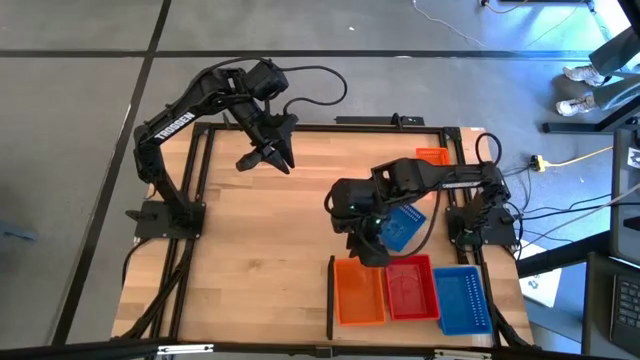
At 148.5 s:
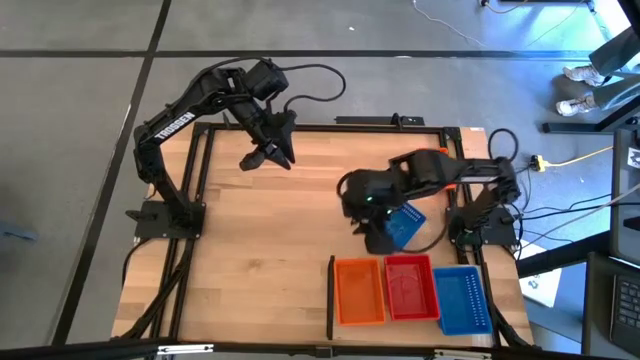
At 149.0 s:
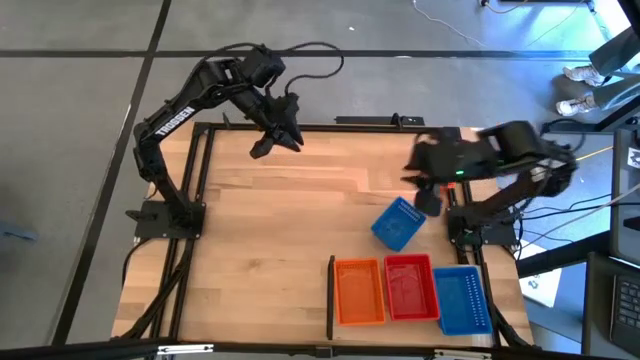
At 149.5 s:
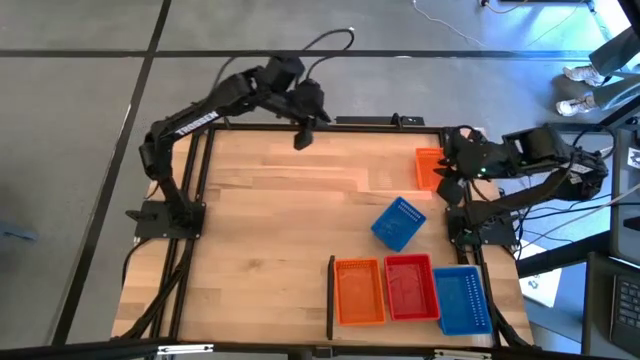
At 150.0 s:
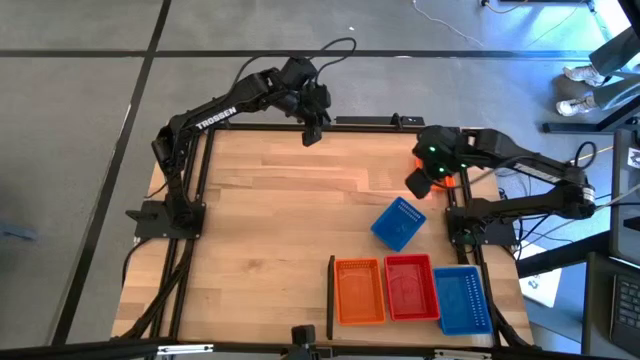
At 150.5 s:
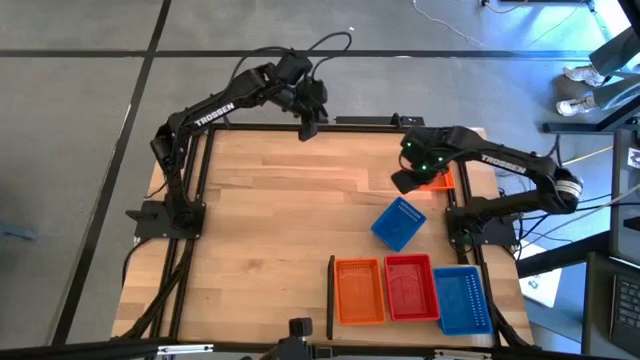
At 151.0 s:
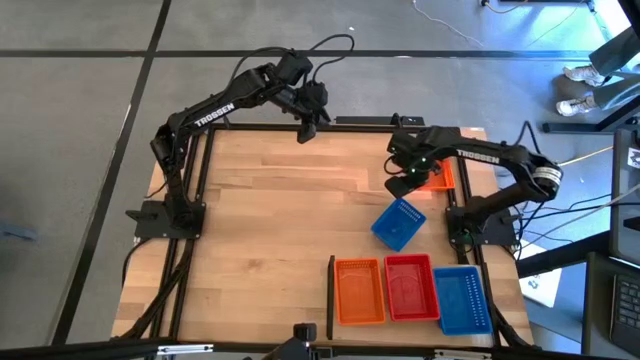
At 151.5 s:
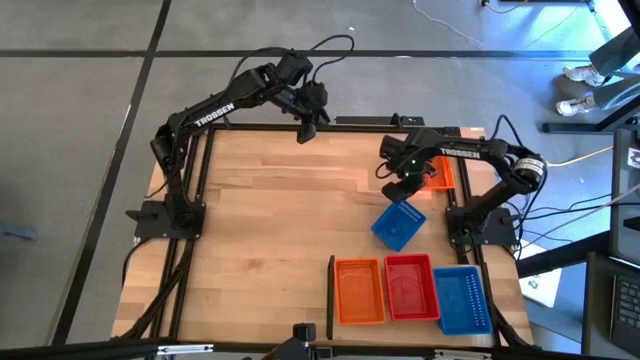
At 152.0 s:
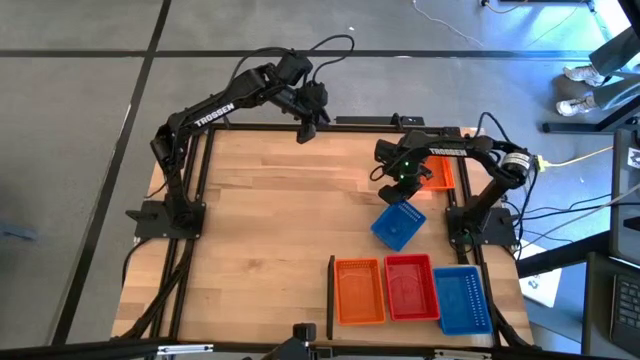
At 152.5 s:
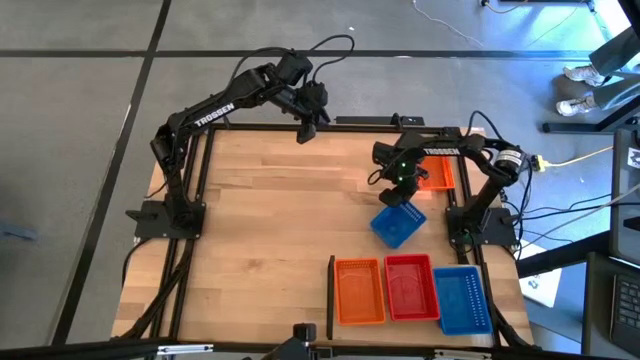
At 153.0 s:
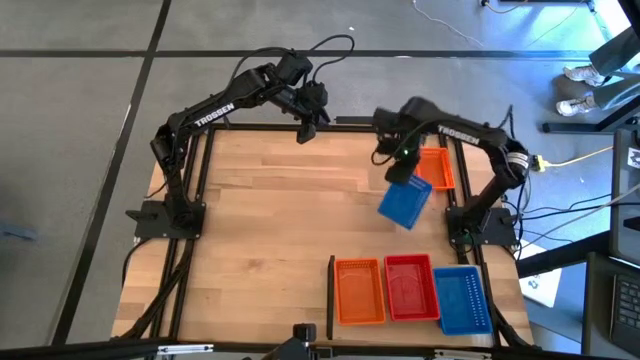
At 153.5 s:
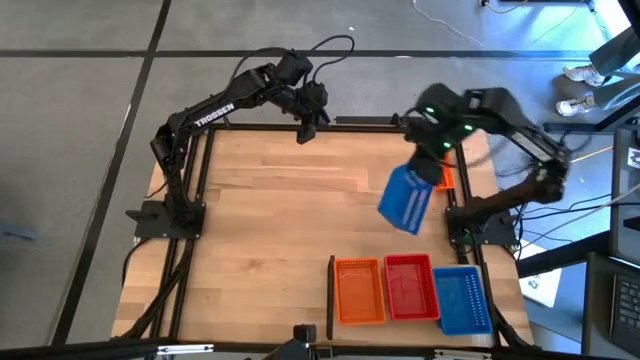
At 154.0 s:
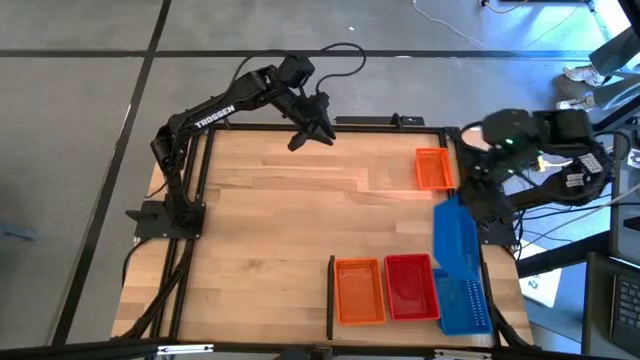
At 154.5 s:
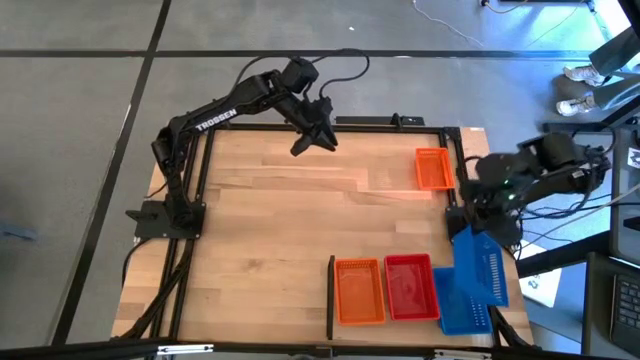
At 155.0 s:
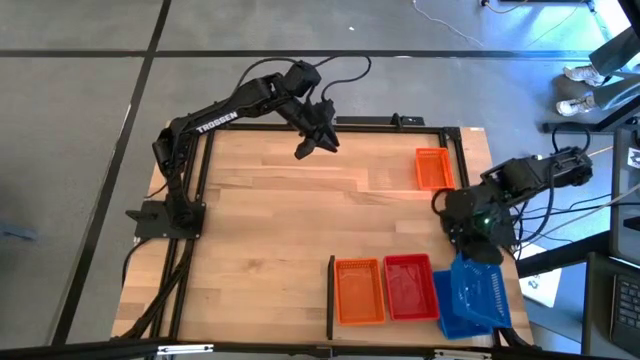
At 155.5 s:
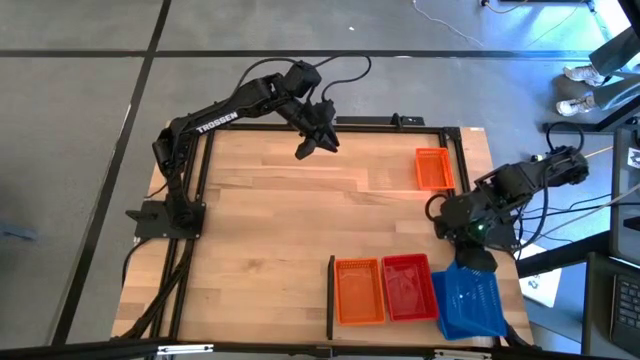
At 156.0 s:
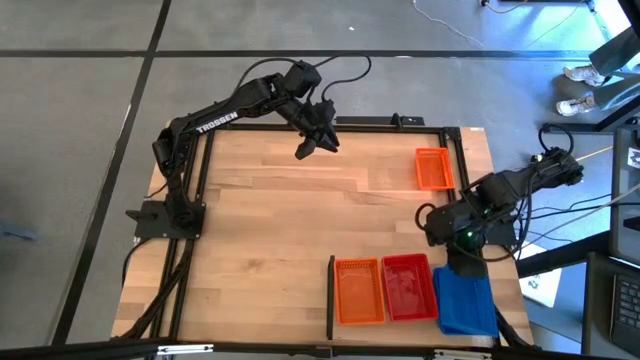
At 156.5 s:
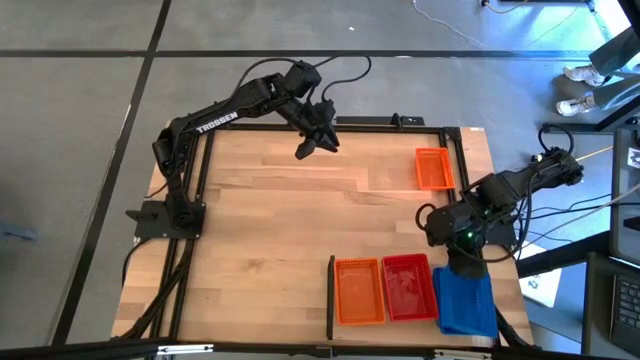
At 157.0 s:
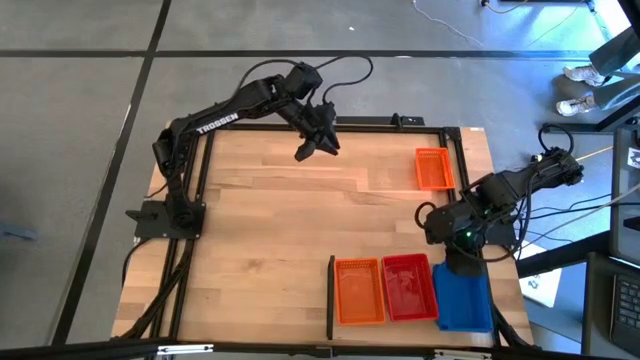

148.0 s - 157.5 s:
Task: Stack baskets on shelf by color
Stack the blue basket on top of the blue baskets on the shelf

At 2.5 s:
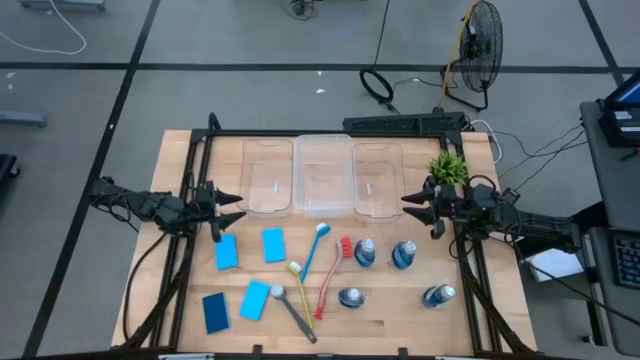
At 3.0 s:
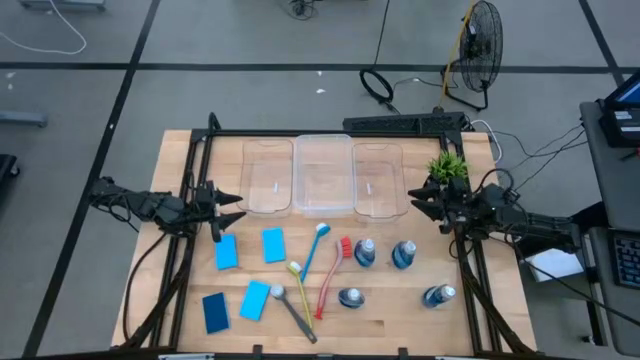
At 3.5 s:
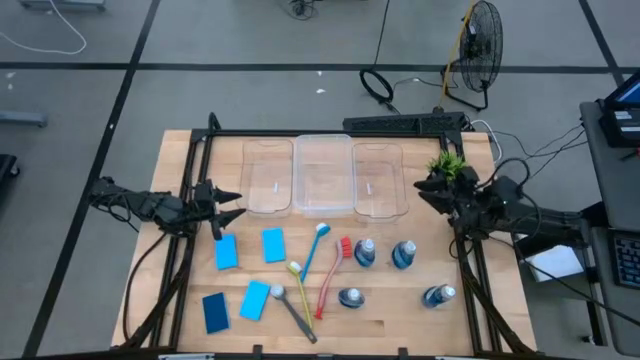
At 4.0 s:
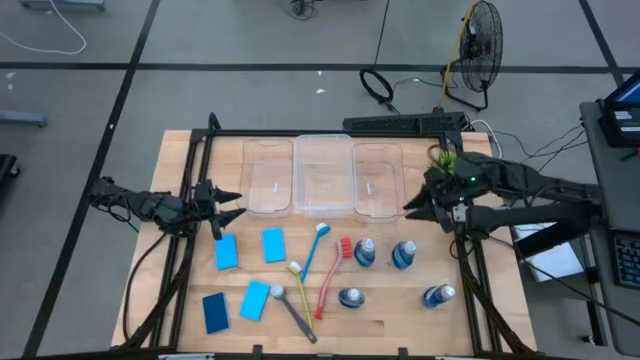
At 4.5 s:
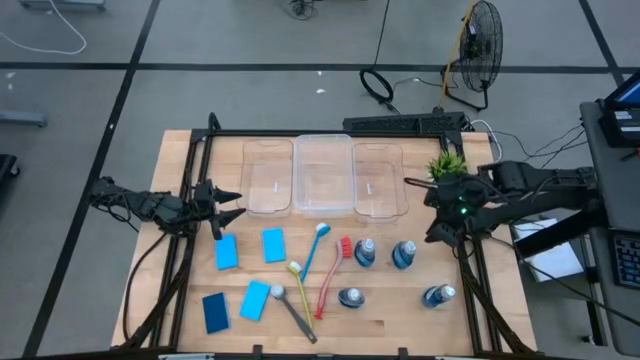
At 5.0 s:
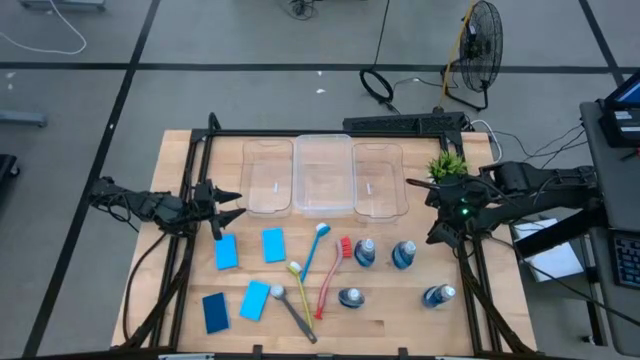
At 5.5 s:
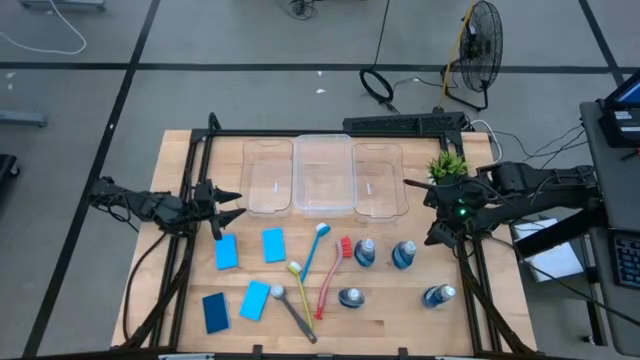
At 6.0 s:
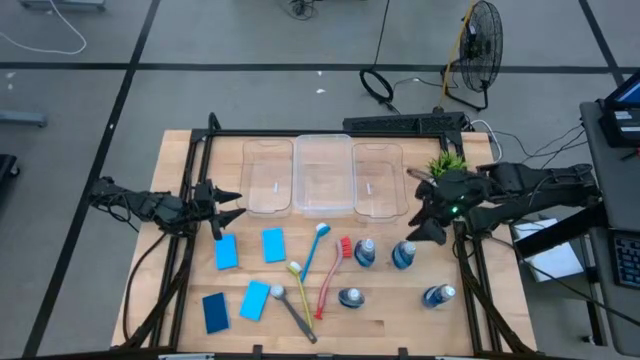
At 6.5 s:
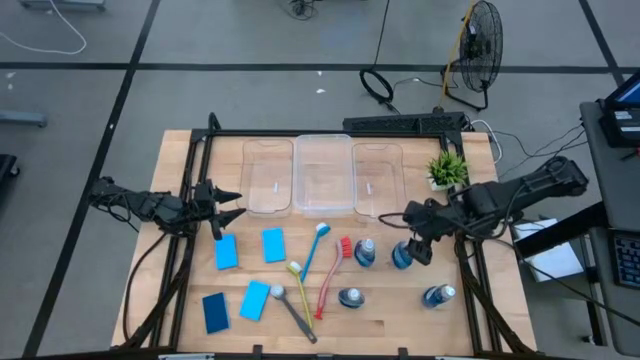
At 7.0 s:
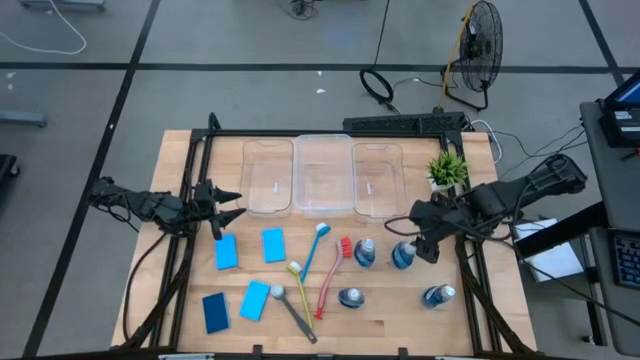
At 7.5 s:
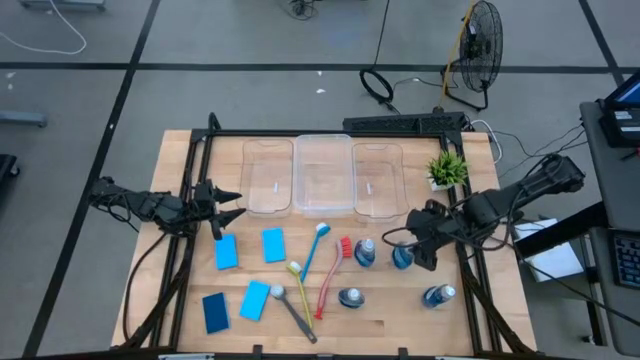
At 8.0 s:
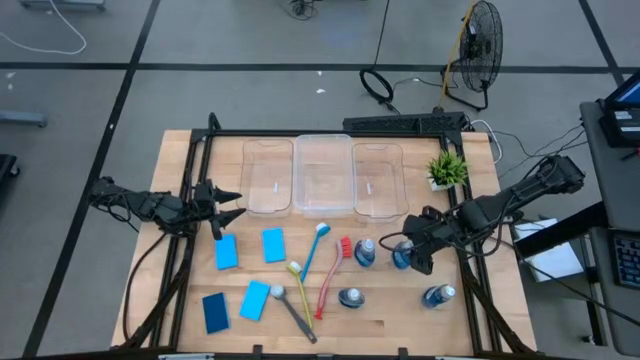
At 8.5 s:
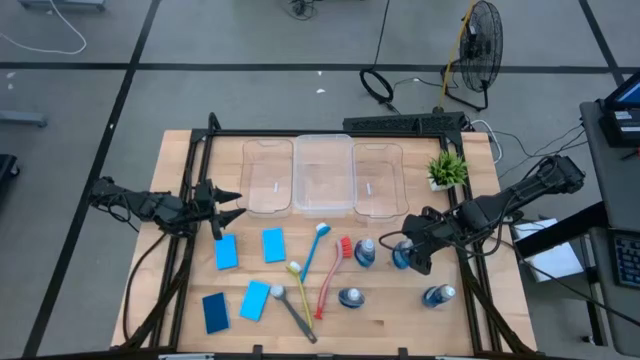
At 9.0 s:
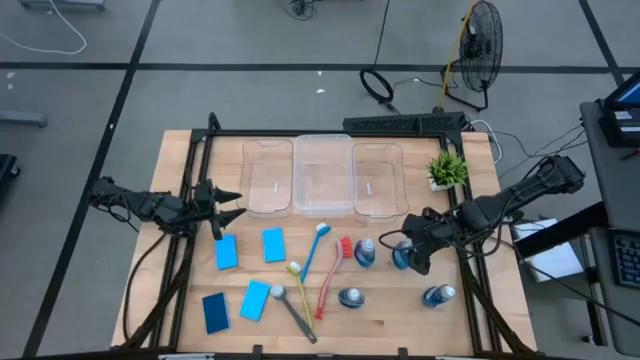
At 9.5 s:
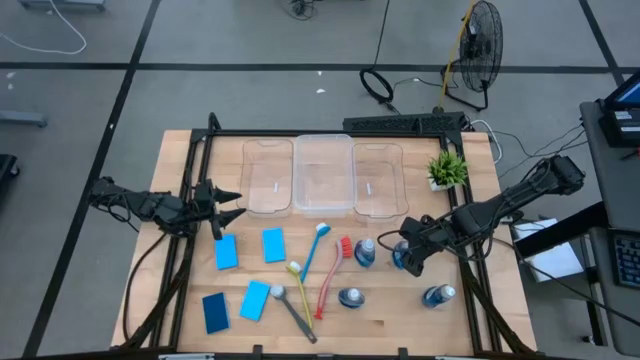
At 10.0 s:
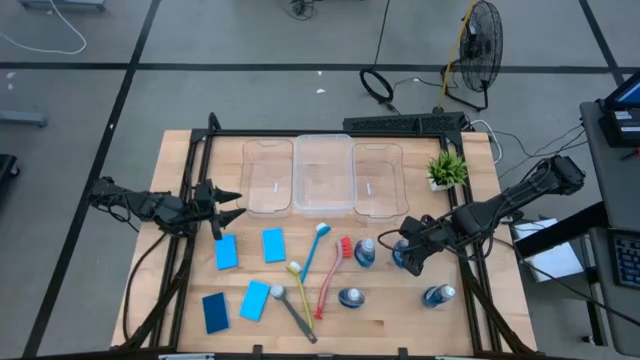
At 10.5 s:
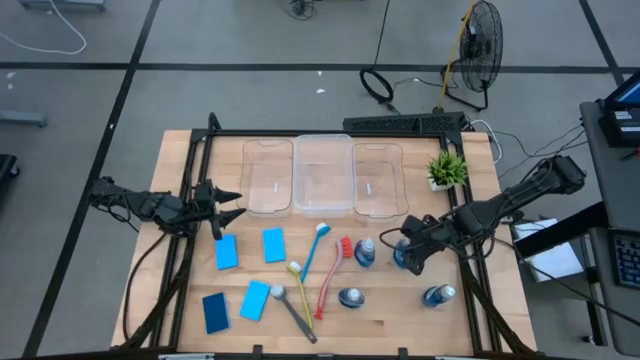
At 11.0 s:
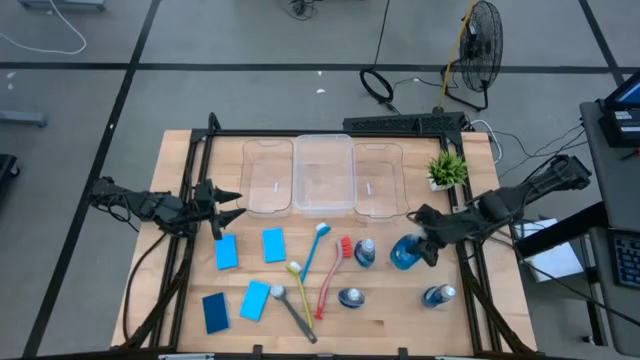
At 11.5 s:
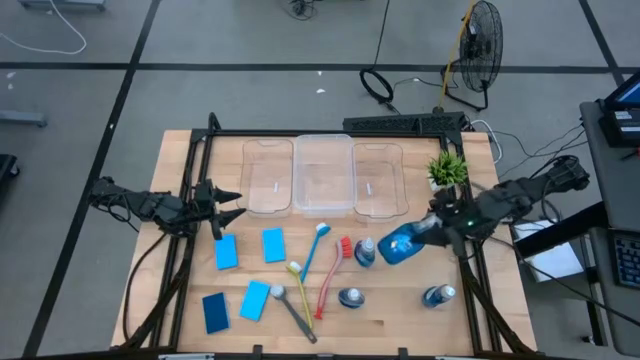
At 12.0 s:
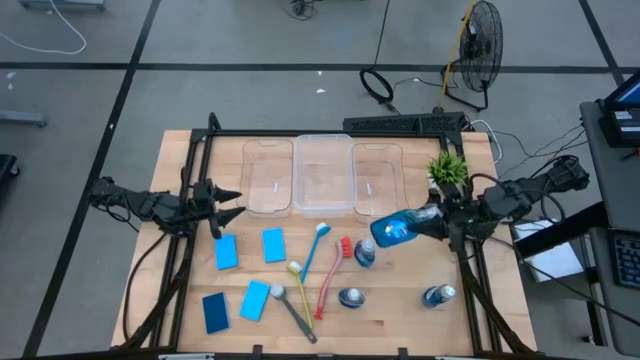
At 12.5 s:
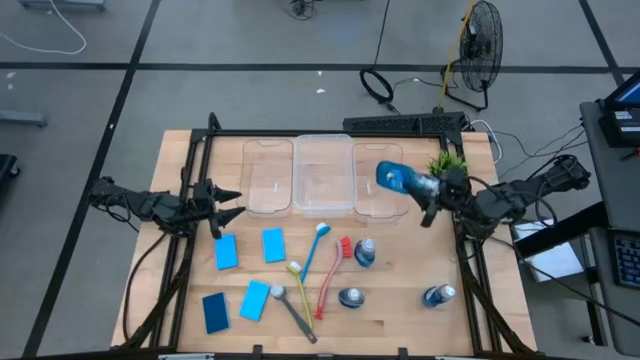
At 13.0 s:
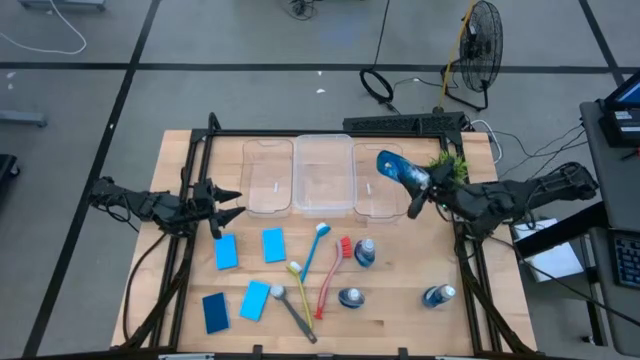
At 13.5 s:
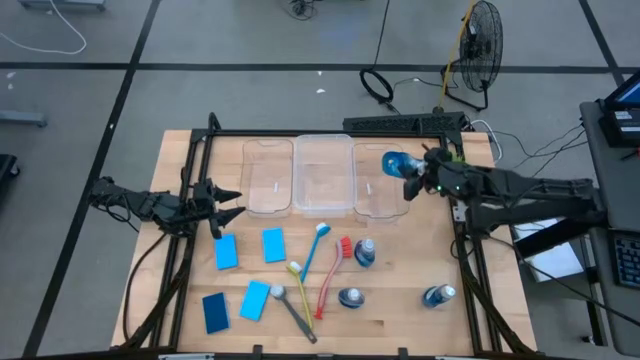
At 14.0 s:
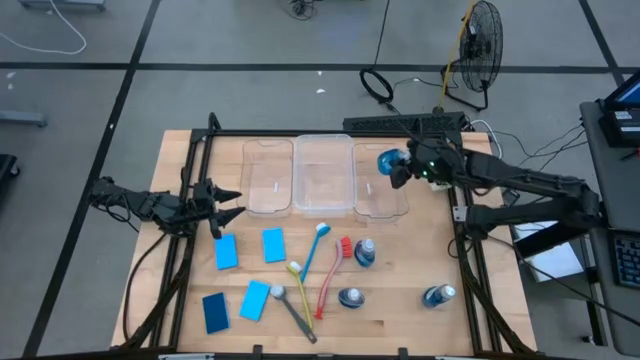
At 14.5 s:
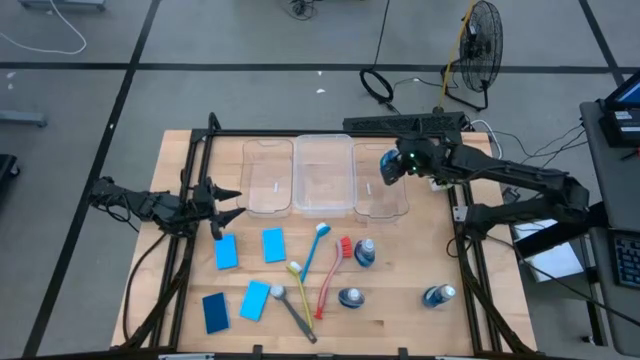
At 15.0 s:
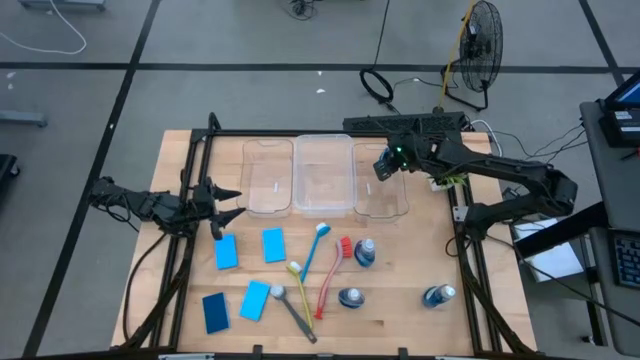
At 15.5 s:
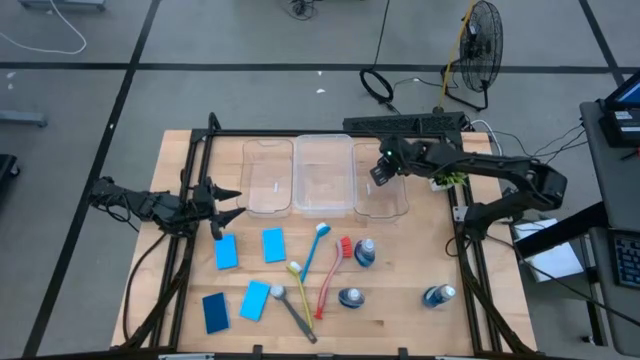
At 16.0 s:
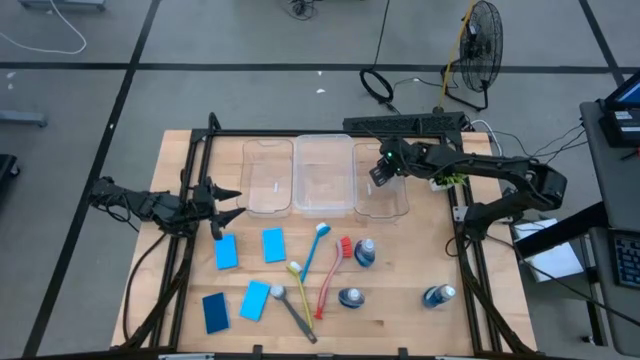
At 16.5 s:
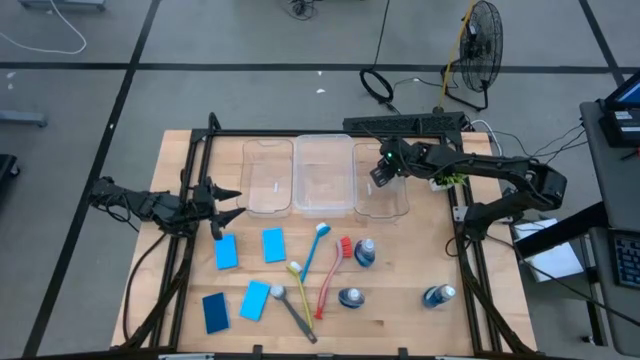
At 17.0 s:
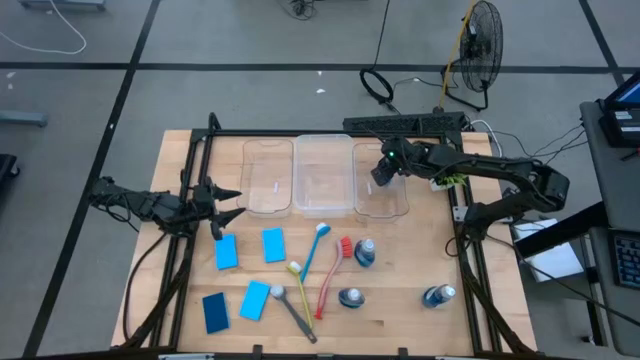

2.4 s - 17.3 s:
Task: Pick & Place Kitchen Sink Supplies
Put the blue dishwashing liquid bottle into the right transparent bin
